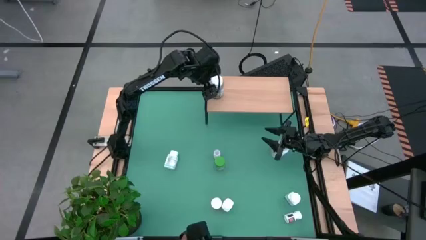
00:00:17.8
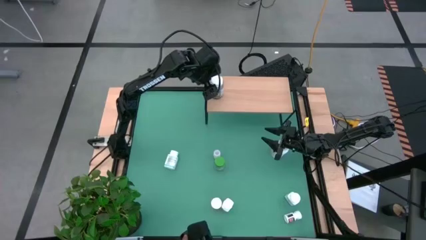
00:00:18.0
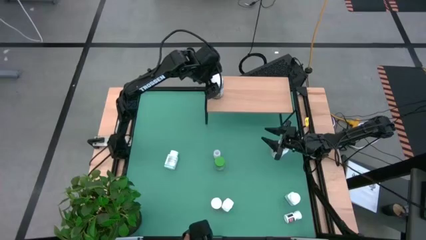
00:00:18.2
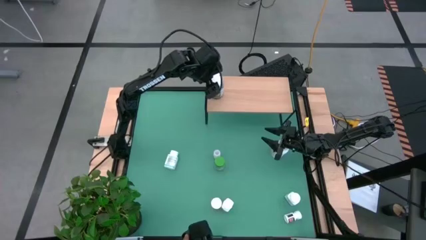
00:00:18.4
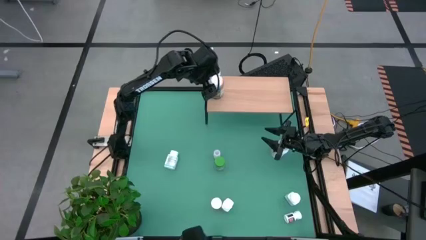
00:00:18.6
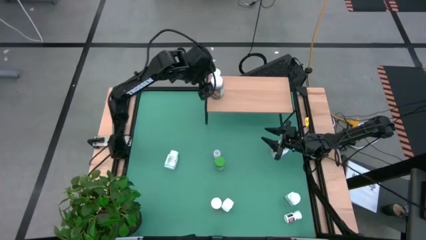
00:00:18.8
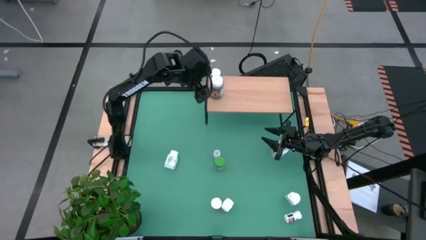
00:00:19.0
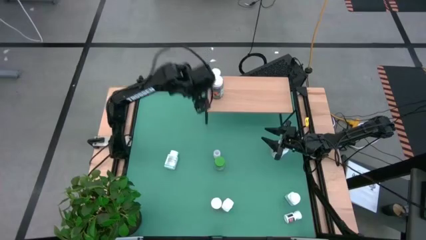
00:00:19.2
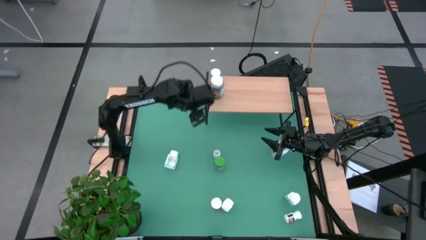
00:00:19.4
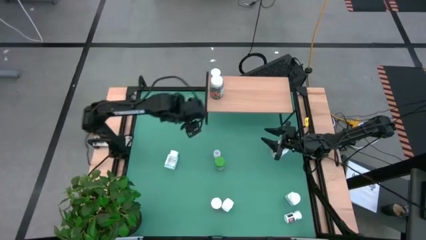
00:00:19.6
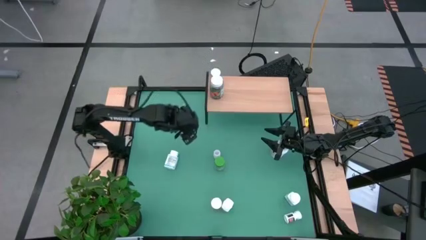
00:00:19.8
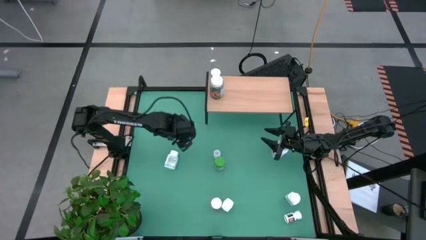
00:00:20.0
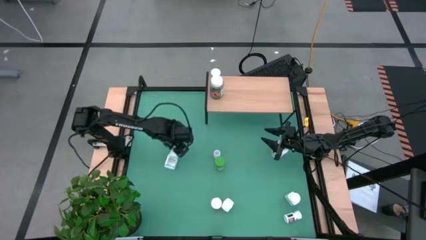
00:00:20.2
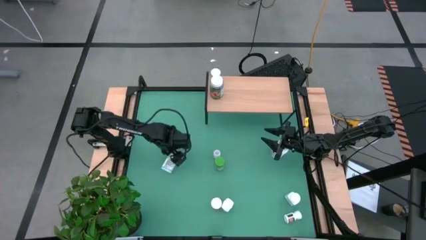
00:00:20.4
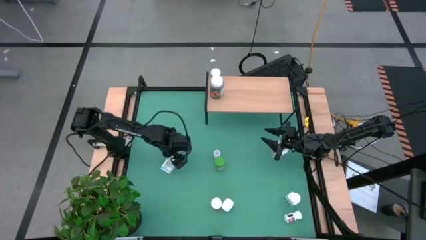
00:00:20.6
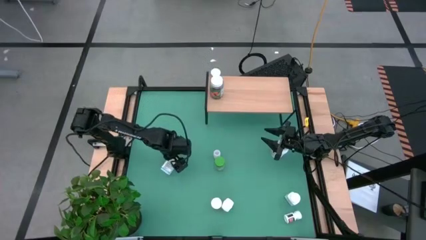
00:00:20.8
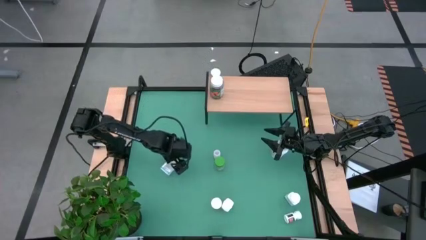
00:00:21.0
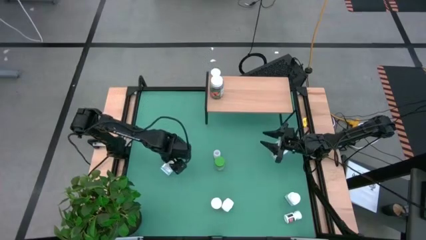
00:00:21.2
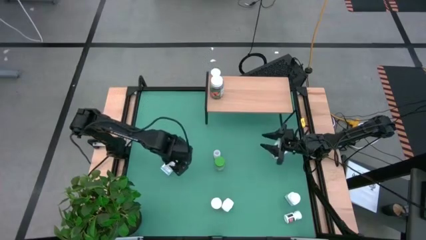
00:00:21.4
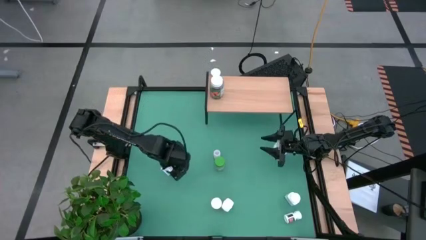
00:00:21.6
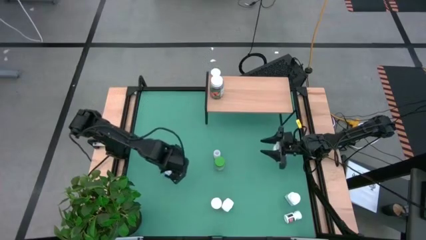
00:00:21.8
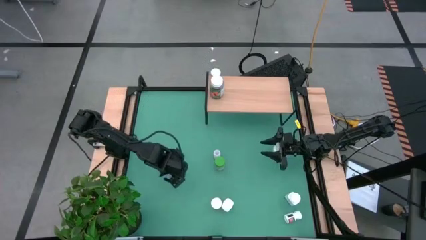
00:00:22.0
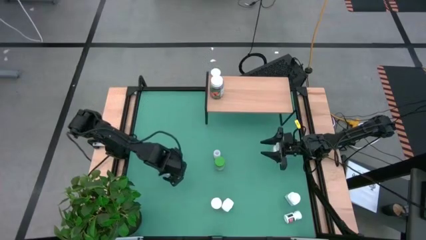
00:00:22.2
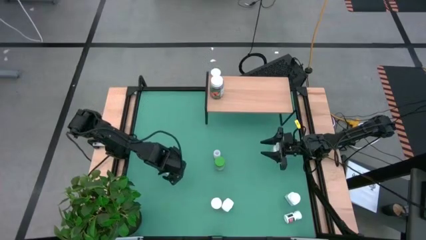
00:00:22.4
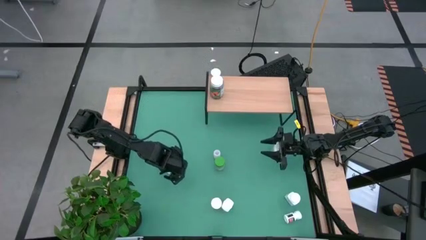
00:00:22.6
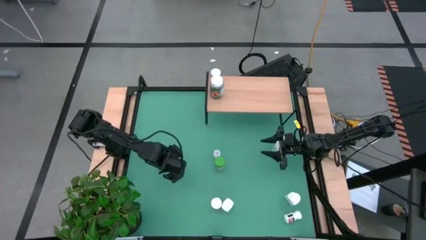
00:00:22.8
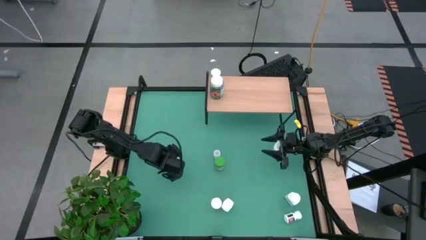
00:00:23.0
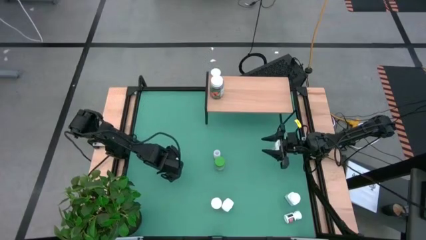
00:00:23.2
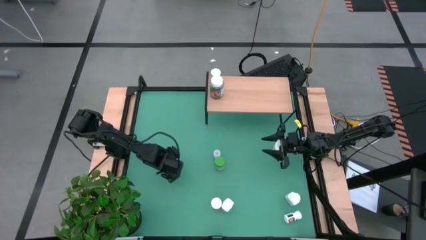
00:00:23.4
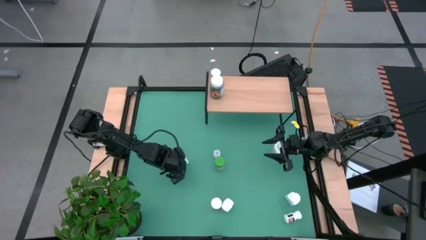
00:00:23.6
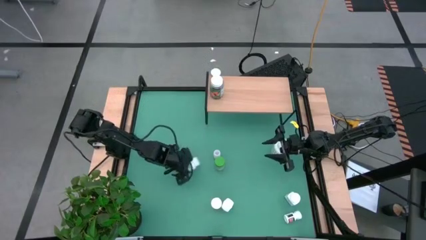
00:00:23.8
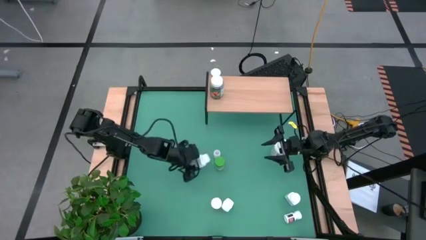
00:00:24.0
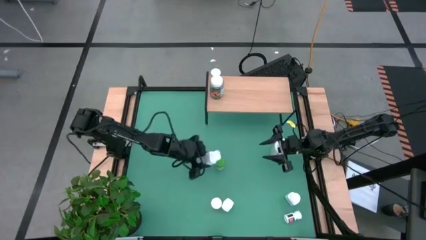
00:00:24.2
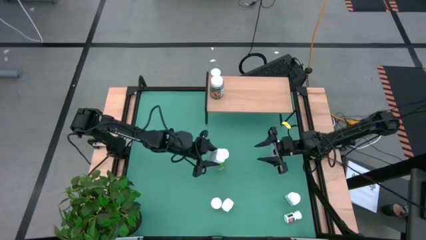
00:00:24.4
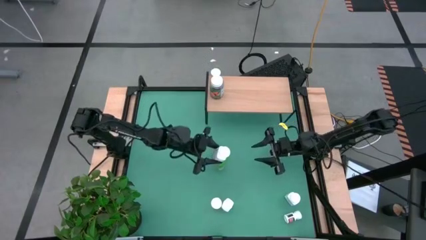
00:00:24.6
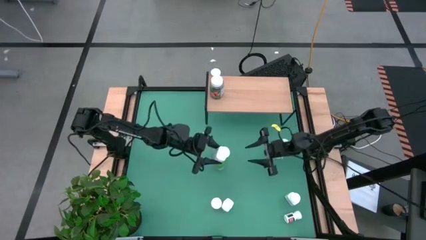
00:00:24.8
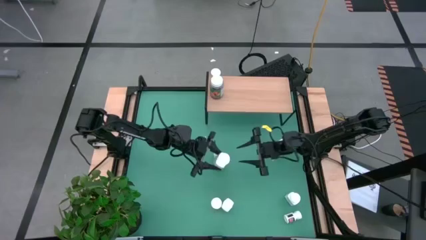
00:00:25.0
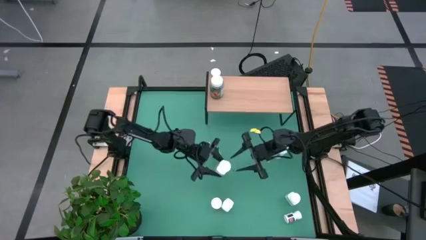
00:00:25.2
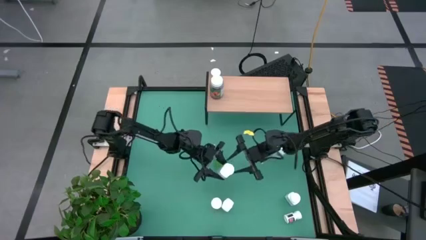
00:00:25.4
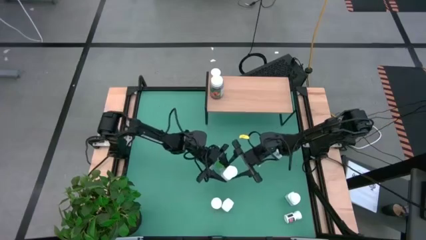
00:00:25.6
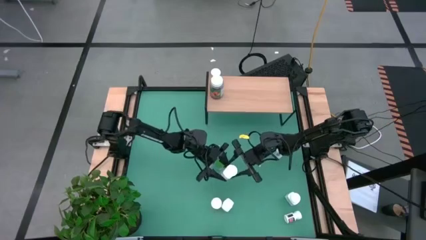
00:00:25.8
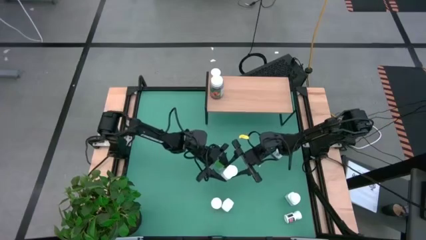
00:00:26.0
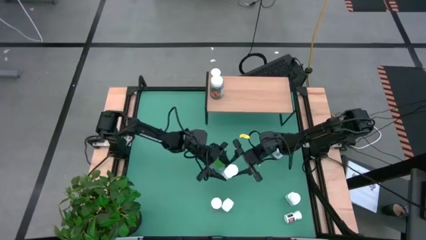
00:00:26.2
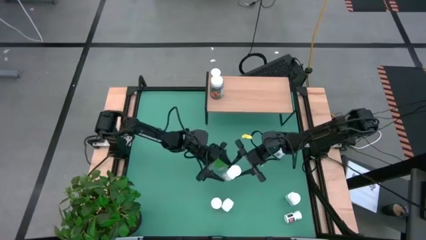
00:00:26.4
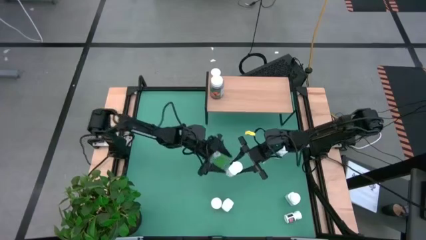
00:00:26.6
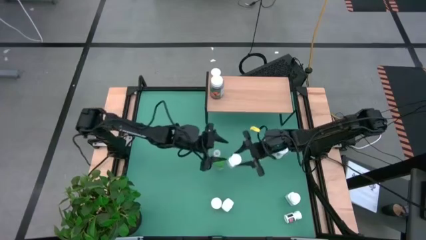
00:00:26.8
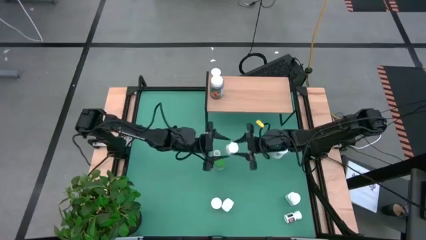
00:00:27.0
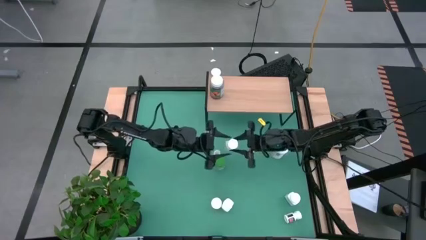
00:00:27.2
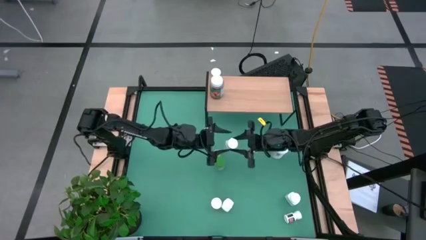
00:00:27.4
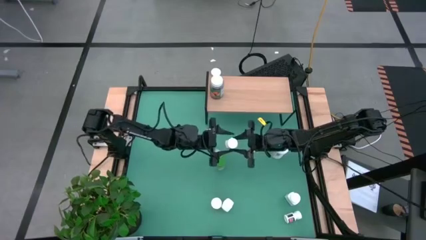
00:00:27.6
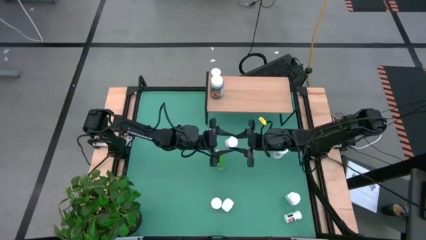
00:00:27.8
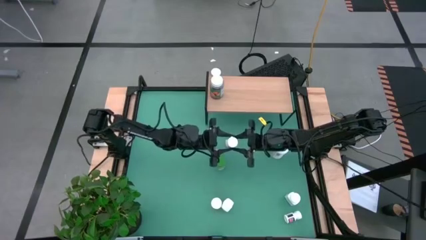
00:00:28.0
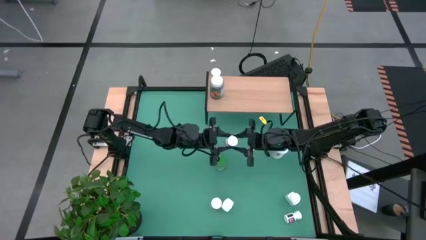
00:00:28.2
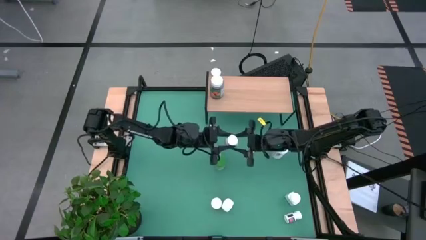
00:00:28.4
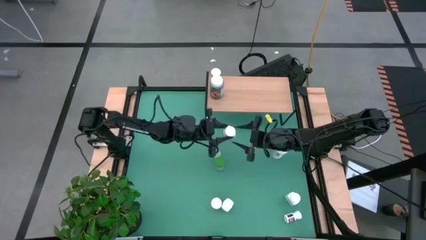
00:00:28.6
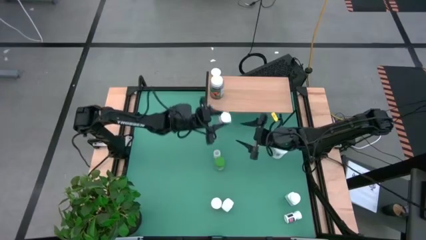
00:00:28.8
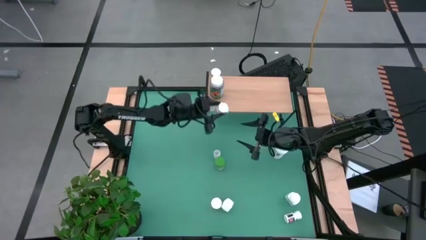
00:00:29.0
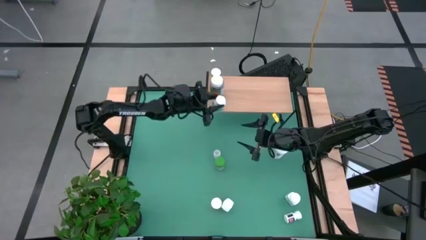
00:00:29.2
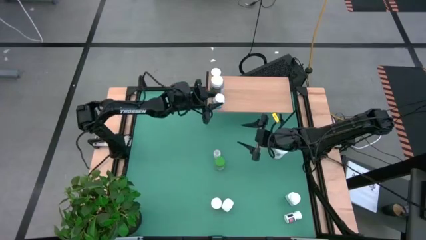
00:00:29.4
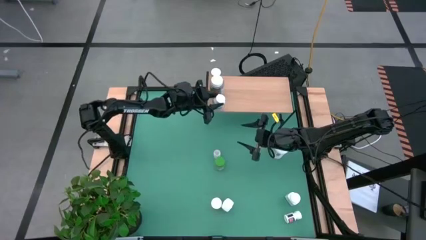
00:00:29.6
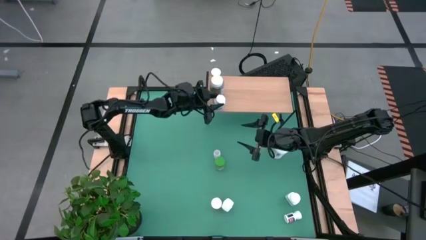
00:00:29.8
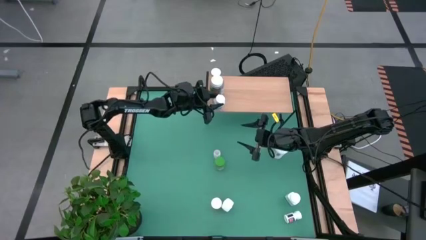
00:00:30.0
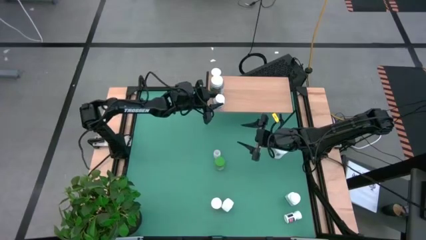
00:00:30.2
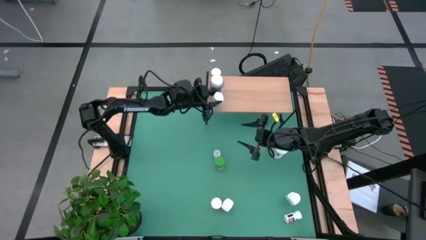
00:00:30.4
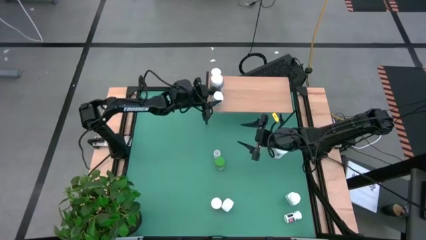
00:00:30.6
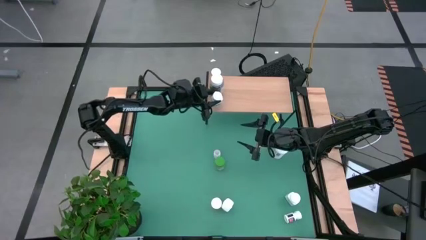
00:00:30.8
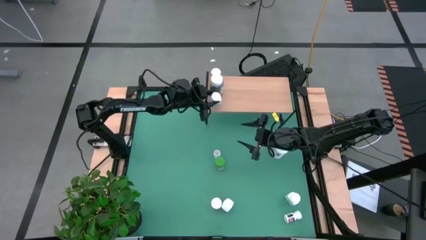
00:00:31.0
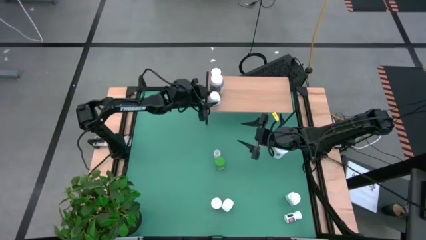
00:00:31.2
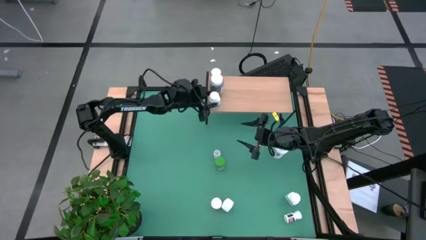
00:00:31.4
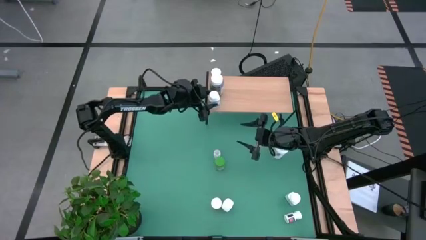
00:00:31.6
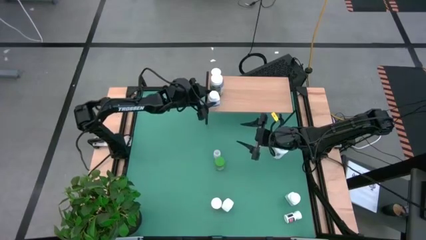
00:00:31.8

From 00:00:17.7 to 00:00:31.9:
Task: Pick and place medicine bottles onto shelf by color
Put the top blue and white pill bottle on the shelf
